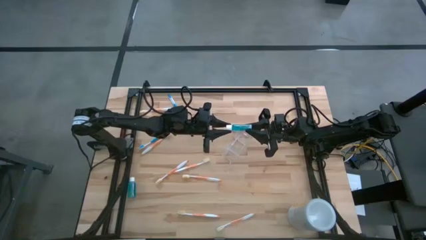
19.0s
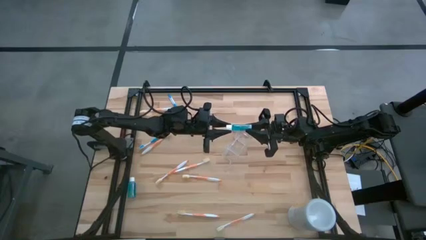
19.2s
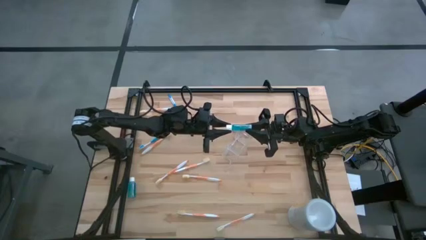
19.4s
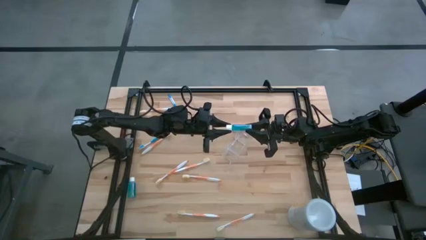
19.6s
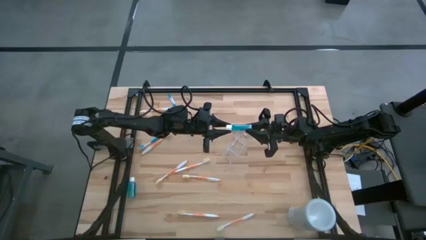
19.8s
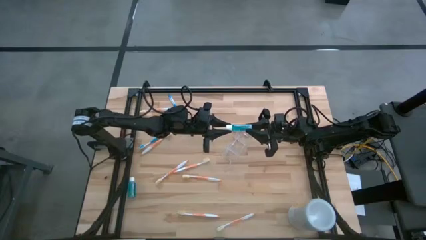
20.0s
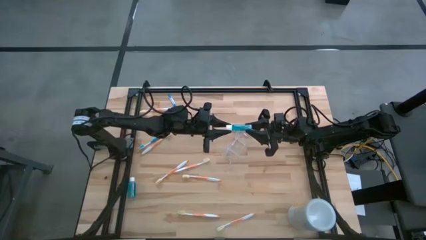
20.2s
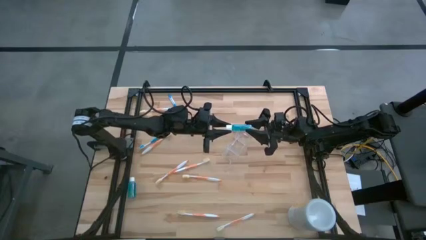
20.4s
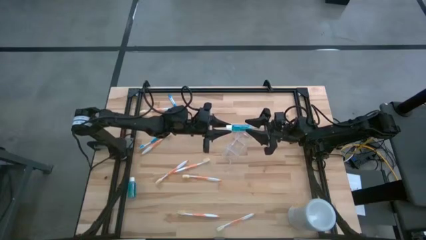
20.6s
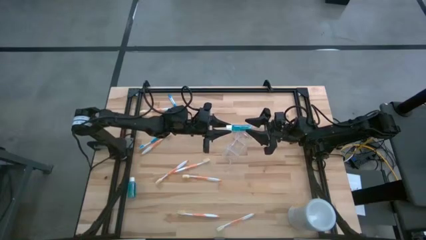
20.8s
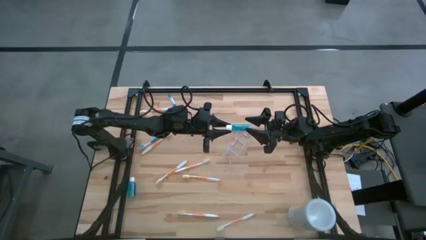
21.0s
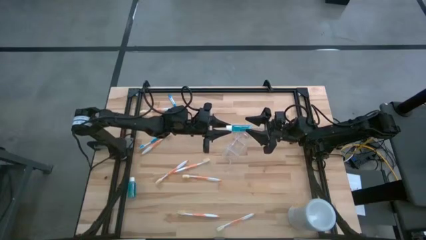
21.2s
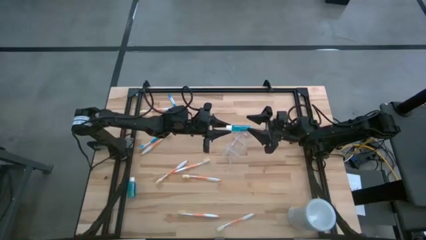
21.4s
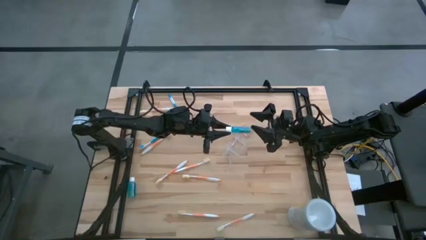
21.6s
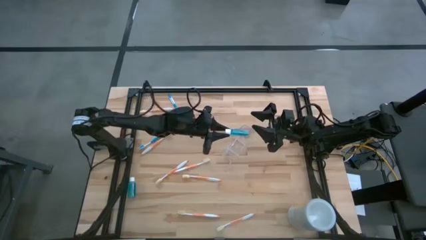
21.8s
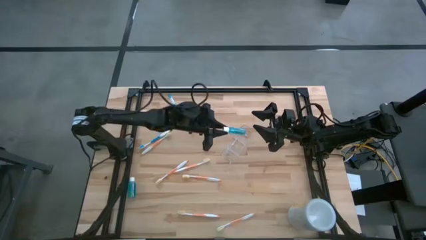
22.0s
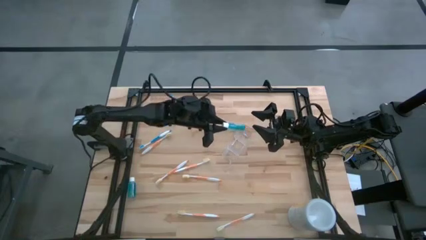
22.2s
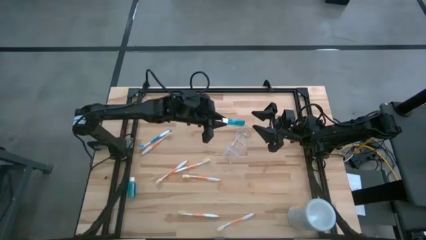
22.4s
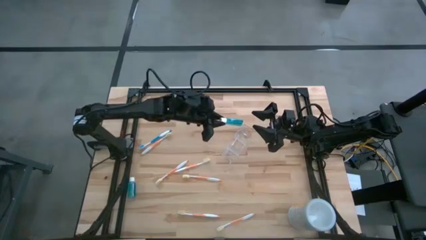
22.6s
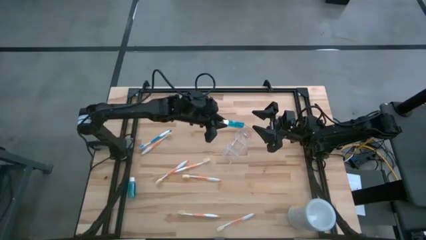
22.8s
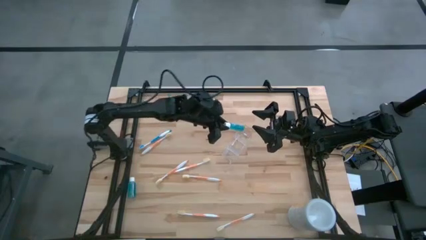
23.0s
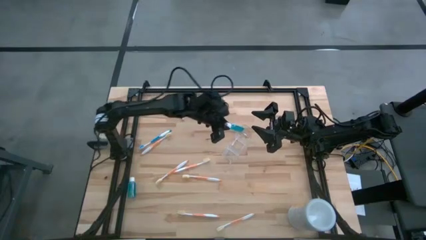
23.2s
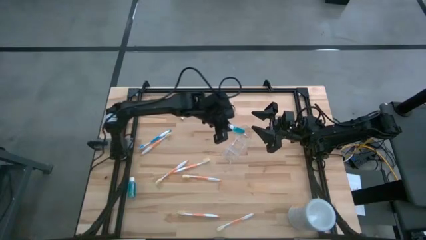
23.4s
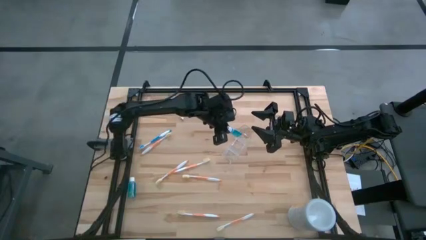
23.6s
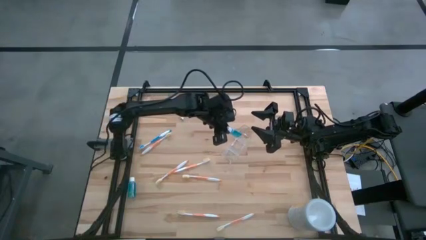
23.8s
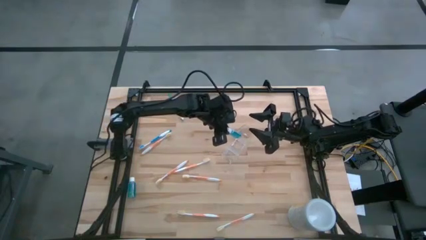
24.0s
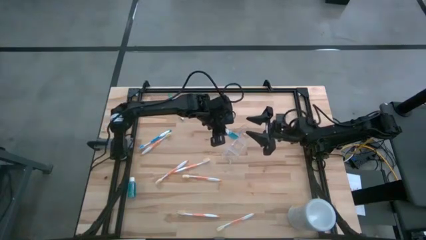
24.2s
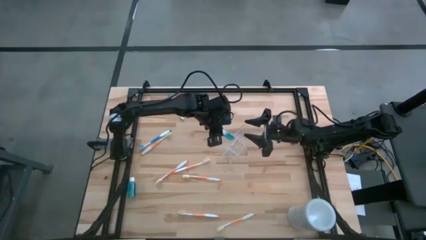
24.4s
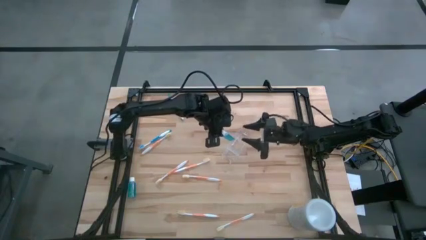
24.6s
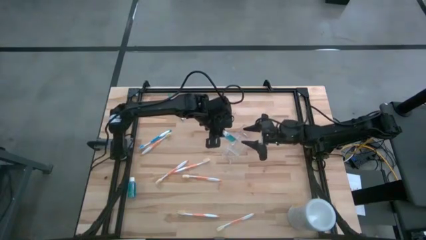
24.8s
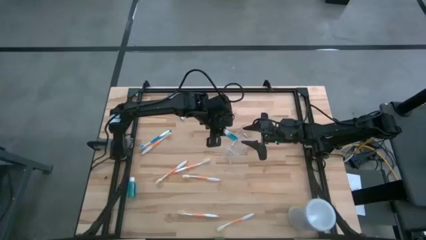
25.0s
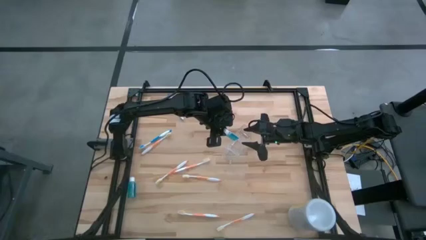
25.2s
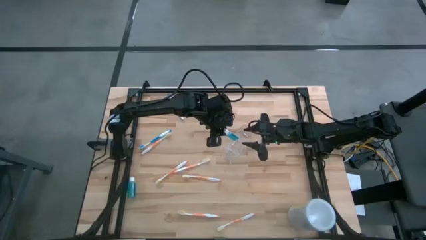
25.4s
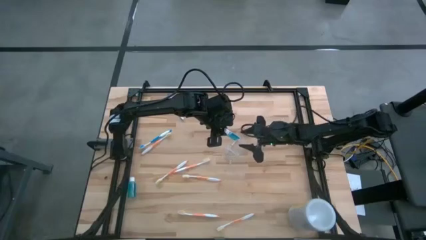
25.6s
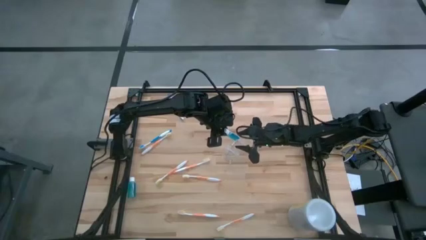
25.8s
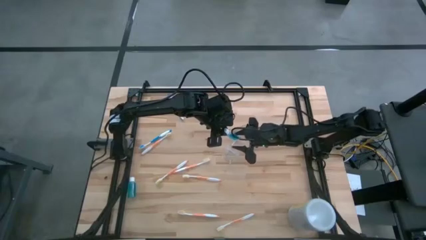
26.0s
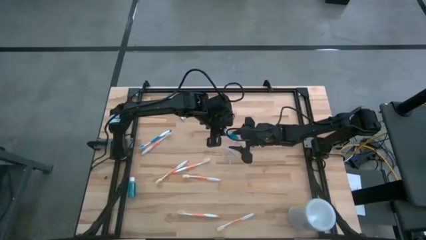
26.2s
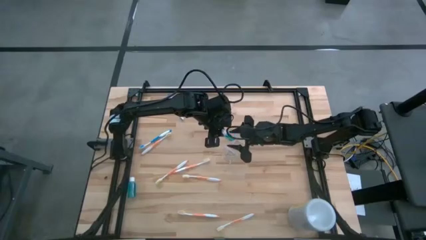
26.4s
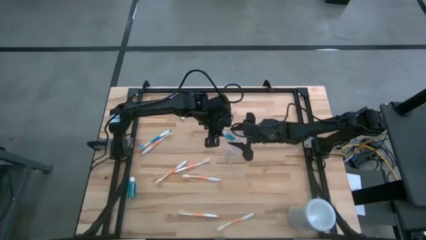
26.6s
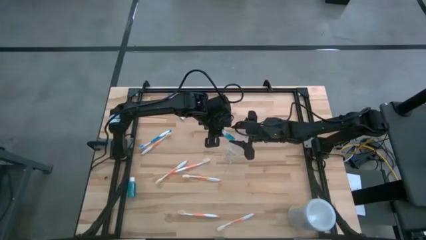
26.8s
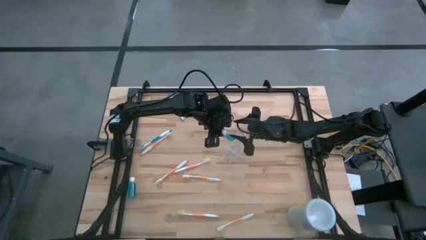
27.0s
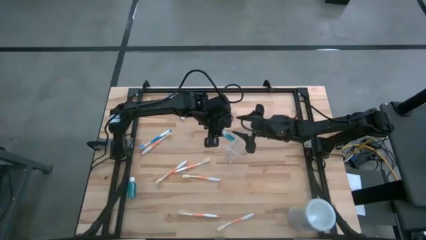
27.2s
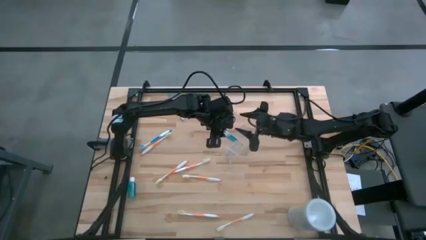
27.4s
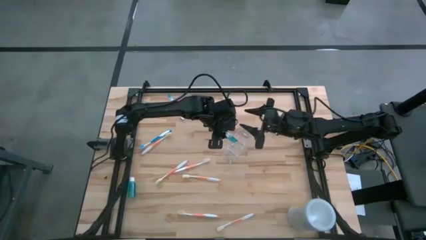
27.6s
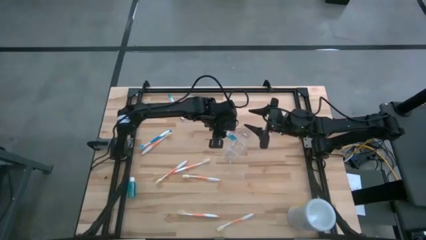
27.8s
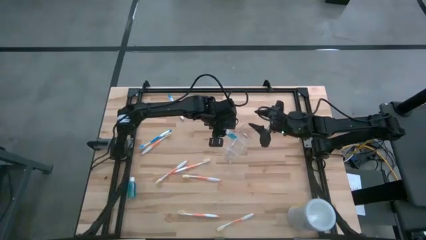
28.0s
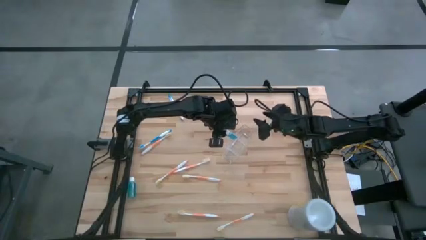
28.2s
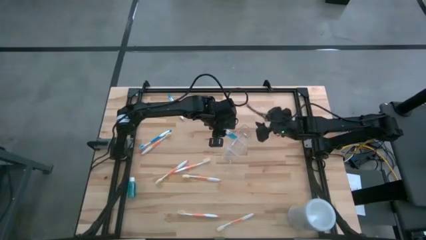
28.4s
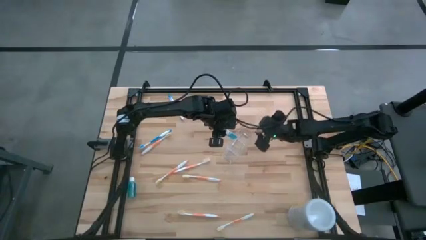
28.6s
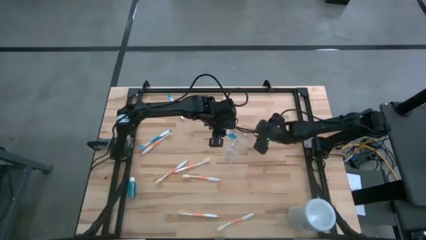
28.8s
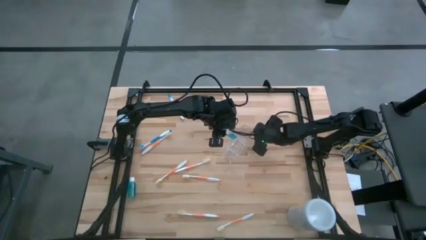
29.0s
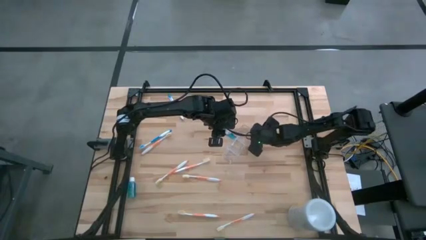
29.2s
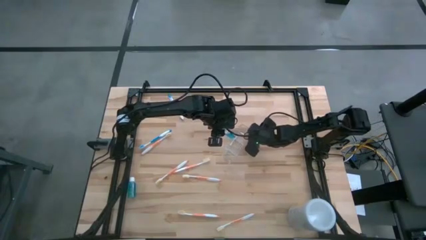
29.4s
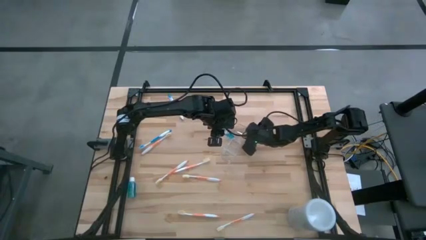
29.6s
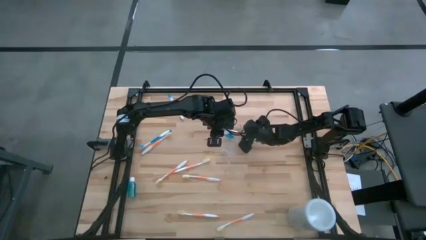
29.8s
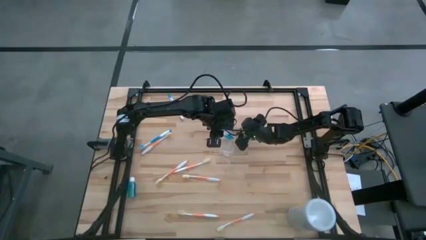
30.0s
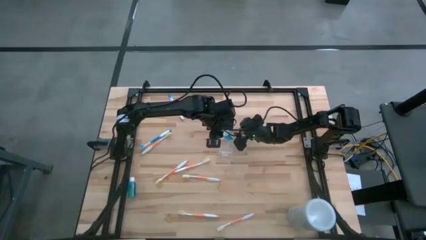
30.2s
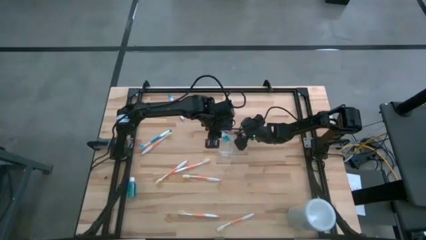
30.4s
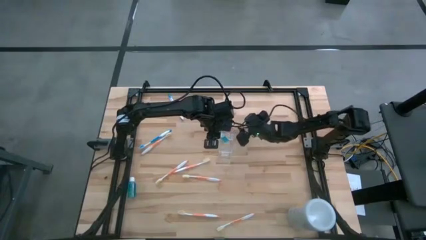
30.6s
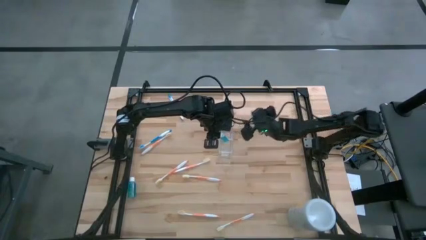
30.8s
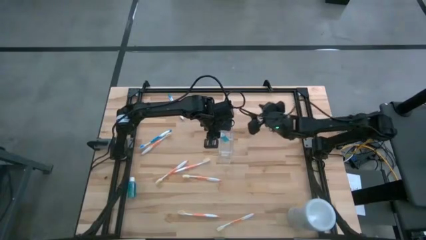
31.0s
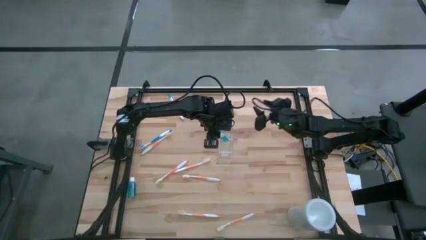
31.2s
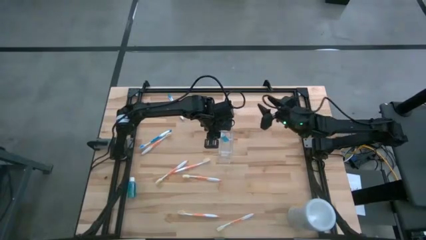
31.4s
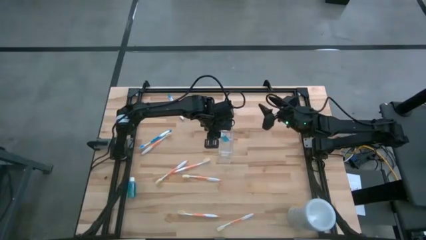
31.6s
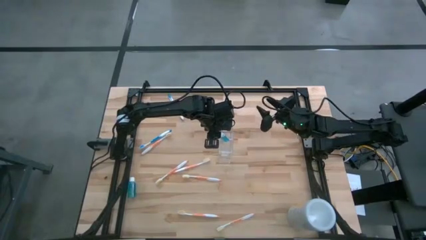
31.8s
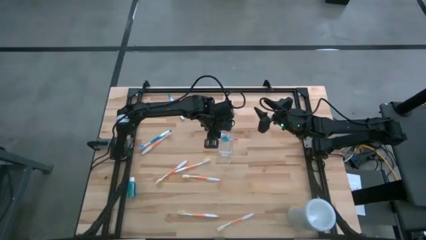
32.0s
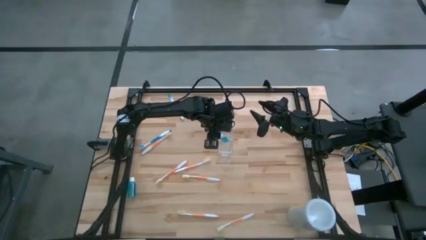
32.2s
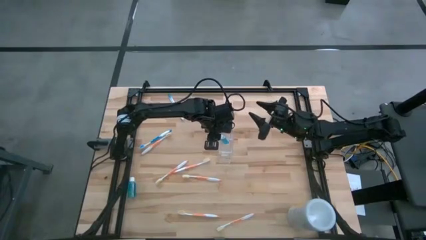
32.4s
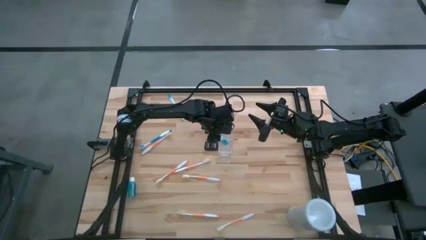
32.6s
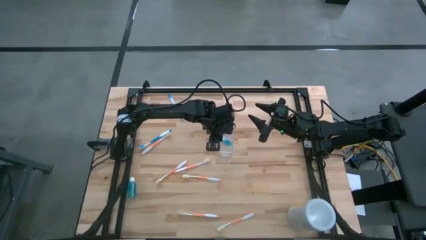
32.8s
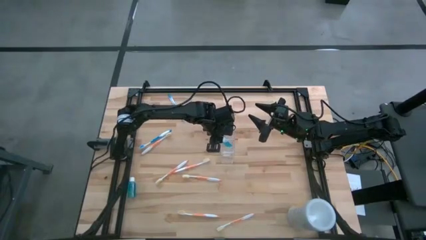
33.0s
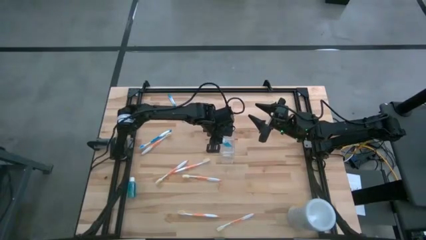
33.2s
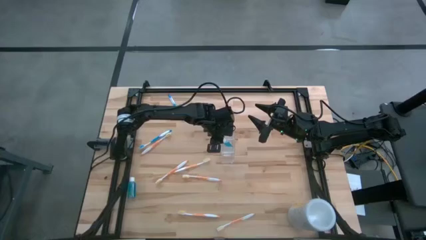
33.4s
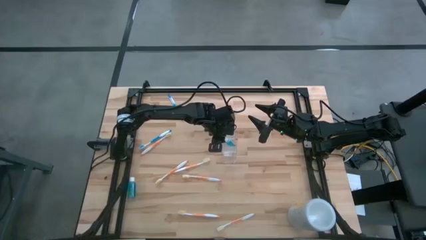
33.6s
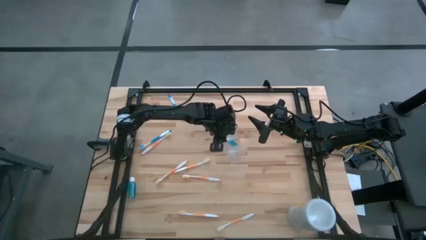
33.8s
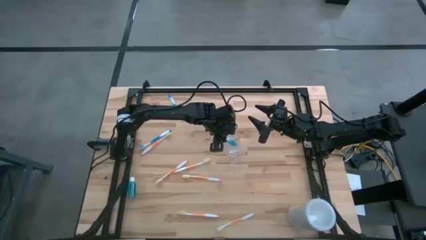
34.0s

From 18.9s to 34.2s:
Task: Pick & Place toothbrushing station
Put the mouthwash bottle into the transparent organizer
